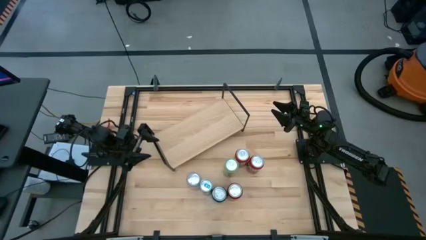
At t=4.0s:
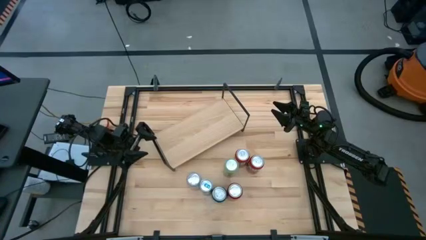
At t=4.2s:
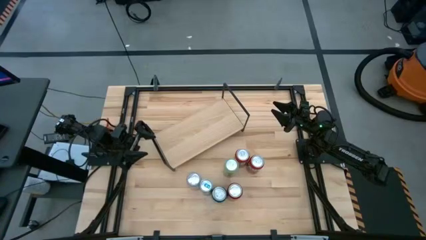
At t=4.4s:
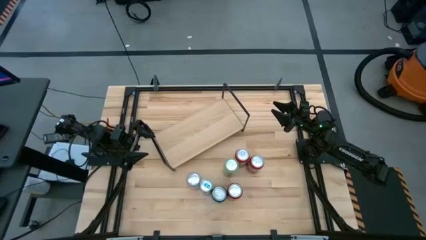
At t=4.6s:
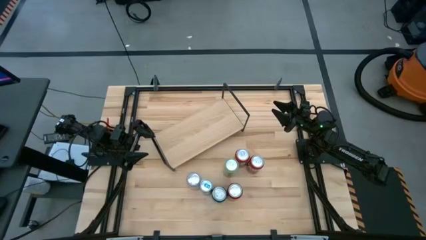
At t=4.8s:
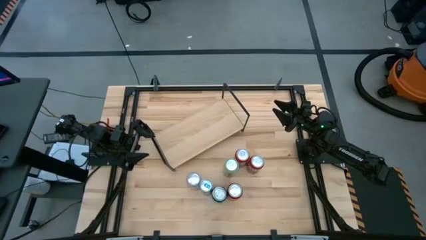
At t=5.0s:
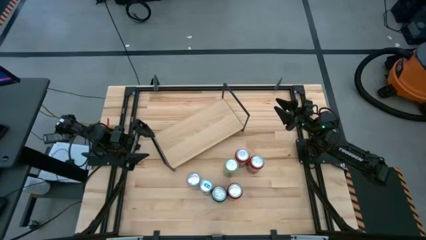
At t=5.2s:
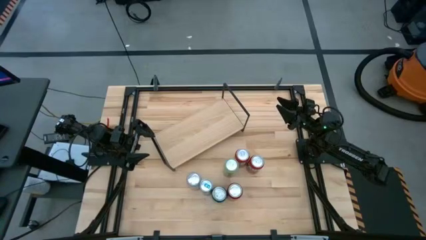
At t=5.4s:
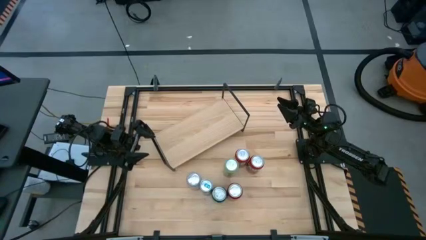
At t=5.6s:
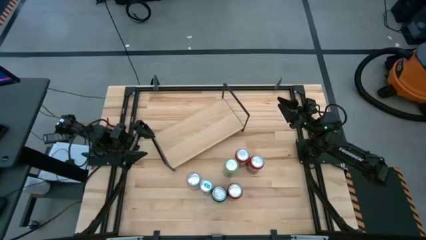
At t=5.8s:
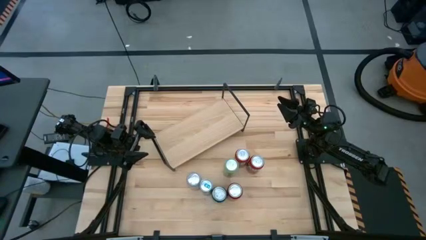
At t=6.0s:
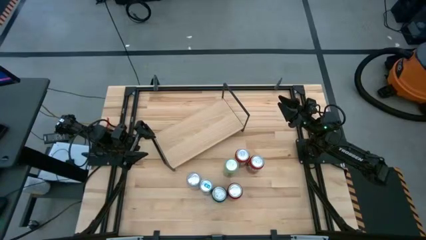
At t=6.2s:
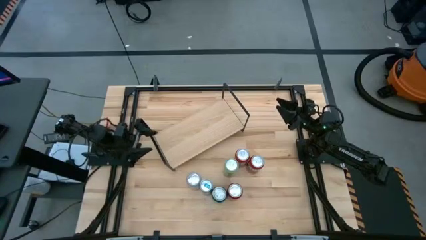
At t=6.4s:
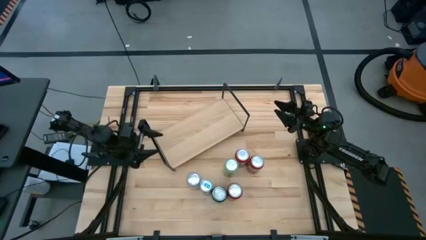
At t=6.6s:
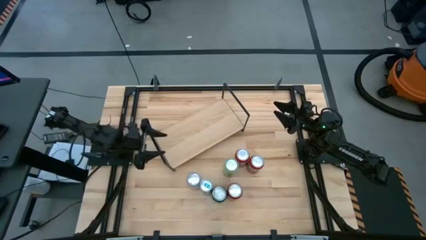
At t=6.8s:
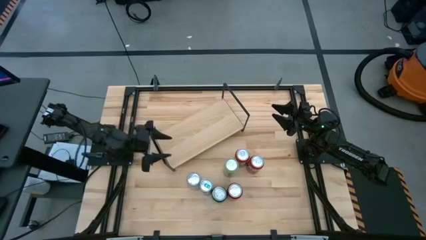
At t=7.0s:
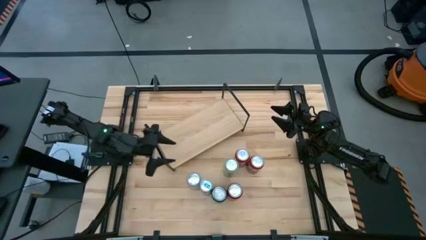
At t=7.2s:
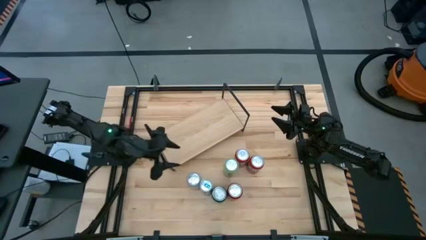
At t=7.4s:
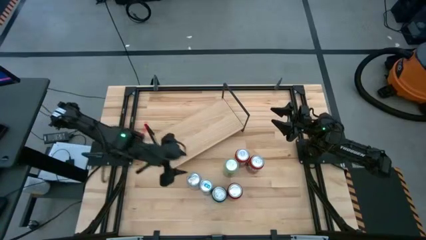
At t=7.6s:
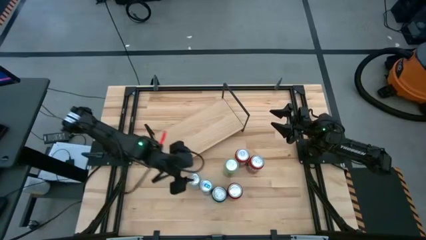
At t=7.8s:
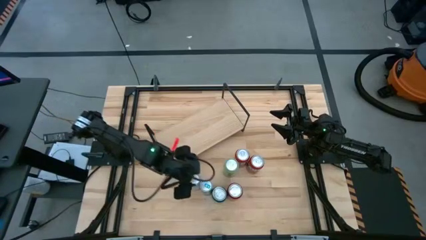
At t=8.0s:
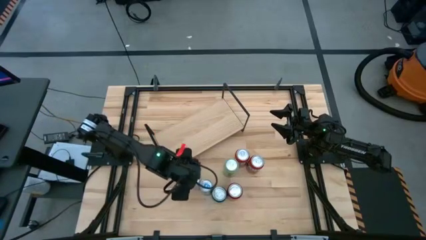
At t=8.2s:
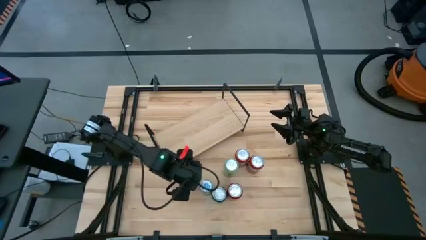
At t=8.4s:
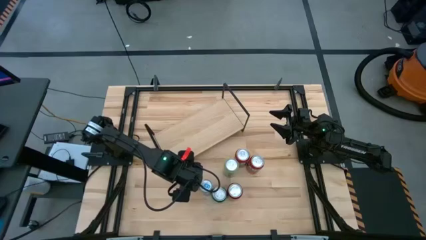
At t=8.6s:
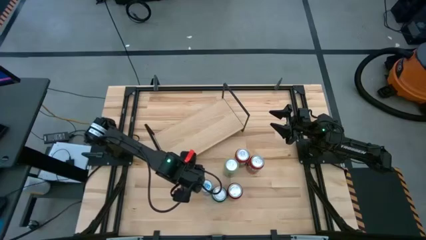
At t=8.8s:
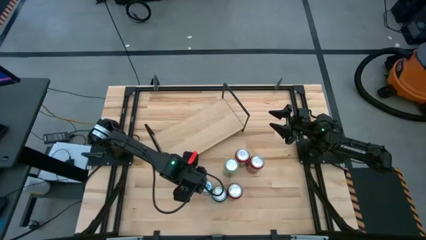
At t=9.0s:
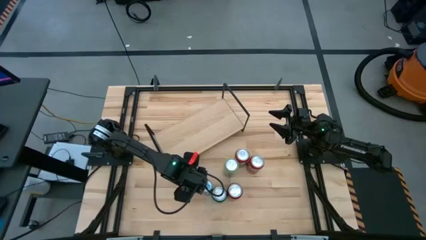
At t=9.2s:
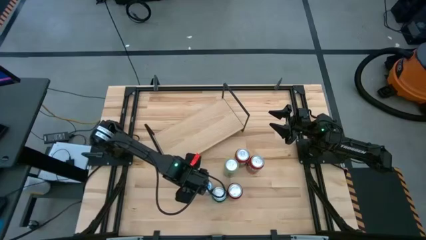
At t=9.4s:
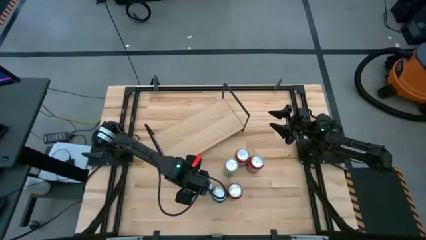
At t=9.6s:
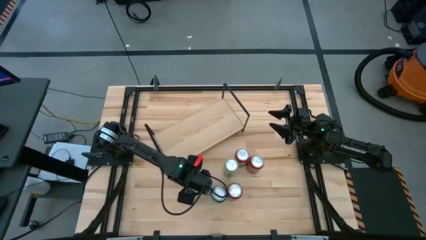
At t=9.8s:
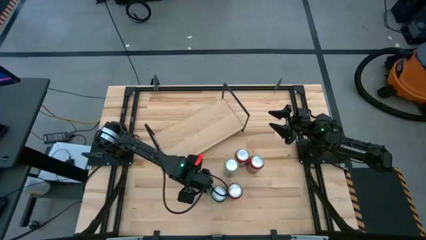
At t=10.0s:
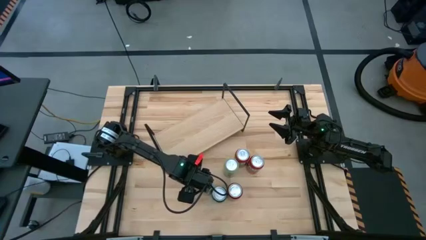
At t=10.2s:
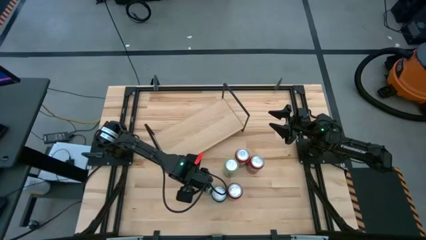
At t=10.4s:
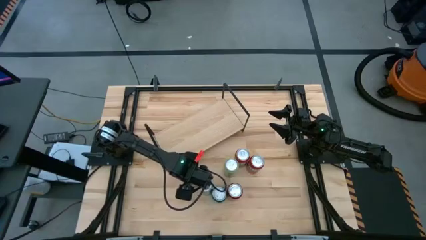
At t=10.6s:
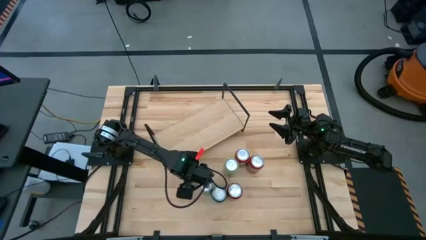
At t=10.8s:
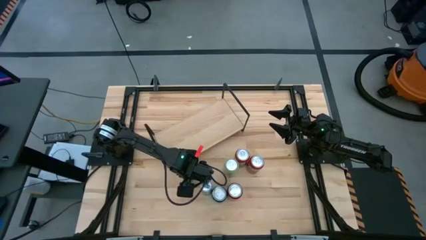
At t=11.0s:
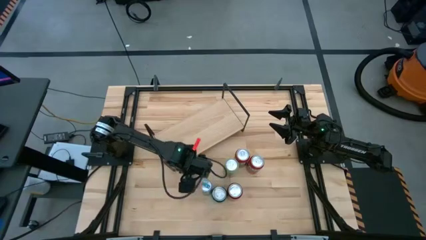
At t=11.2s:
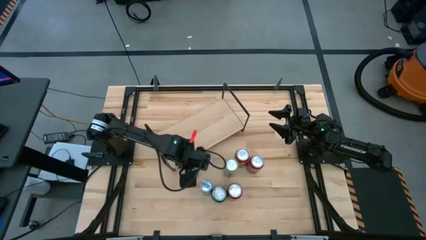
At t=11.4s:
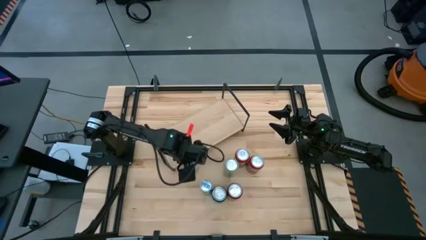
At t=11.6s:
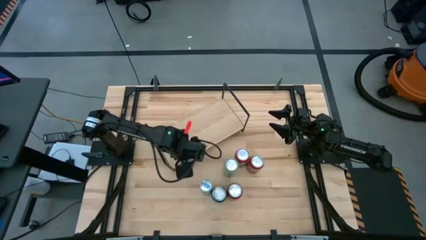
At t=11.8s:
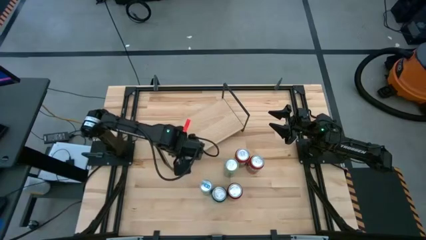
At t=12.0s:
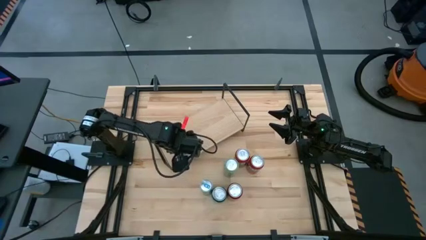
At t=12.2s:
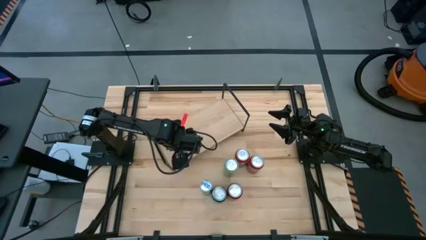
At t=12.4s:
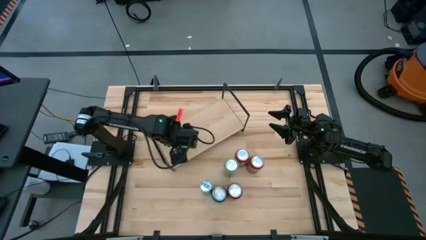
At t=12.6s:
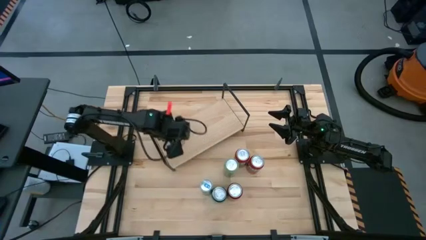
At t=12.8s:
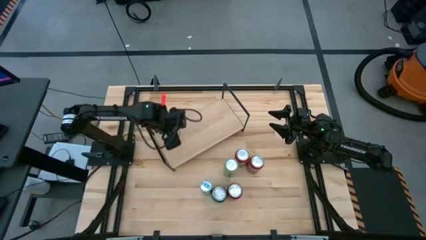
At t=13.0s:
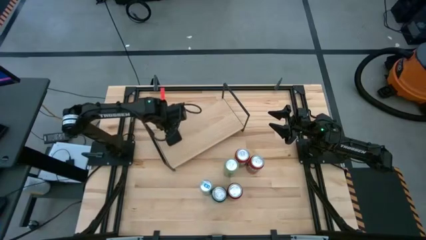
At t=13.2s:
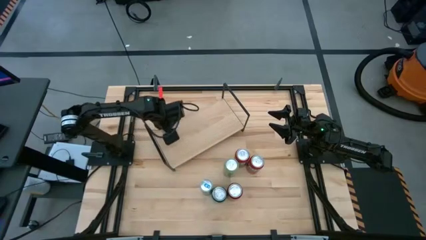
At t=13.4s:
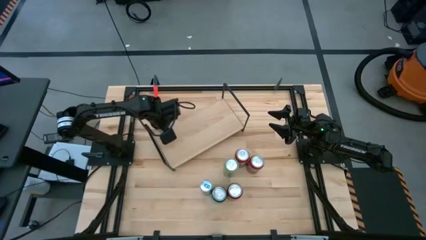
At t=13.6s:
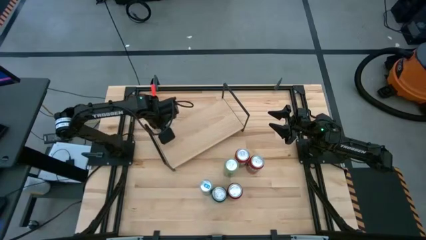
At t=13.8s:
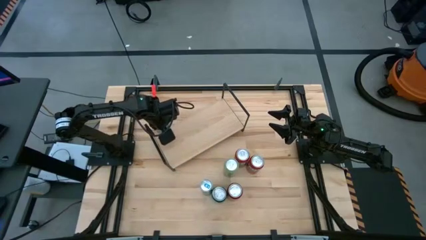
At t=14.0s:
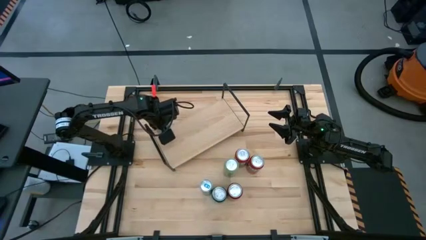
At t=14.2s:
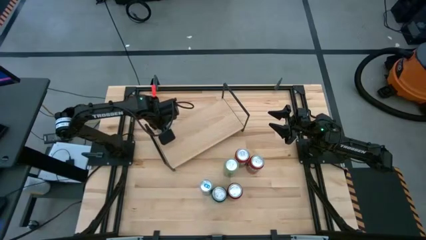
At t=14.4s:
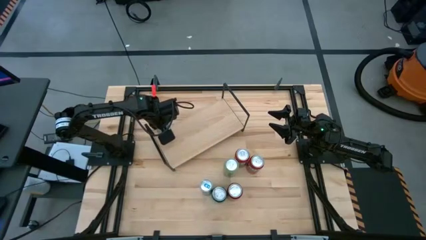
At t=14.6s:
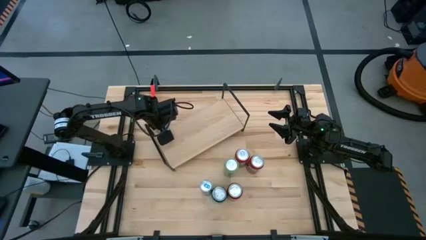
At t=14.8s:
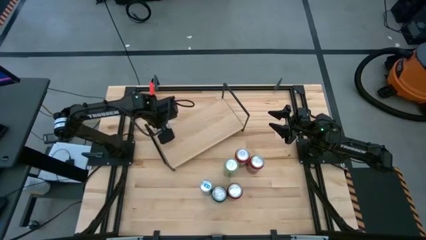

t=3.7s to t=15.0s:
Task: Place canned beverage on shelf
Put the orange white soda can on the shelf
